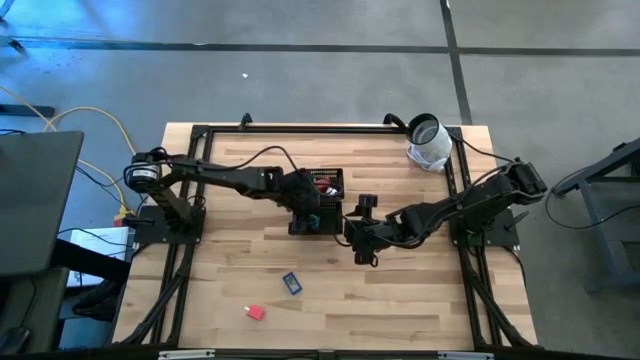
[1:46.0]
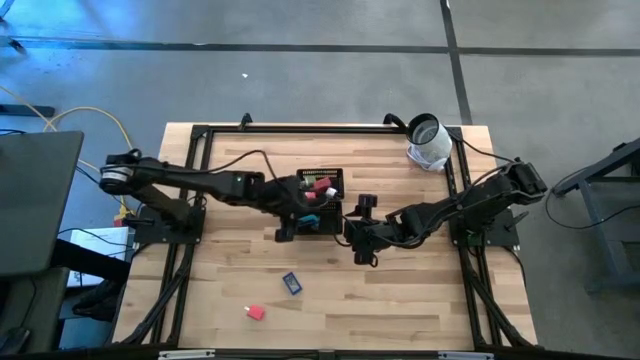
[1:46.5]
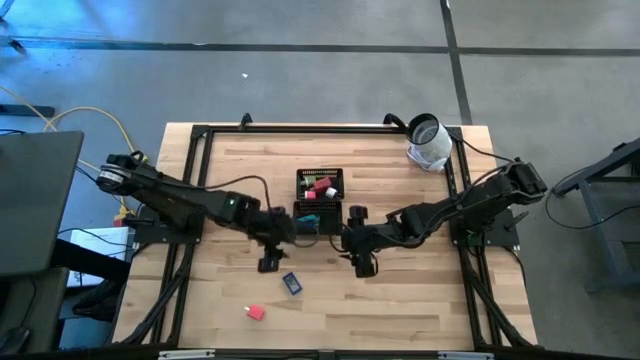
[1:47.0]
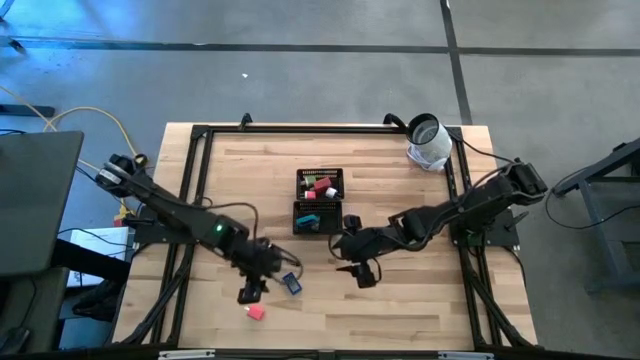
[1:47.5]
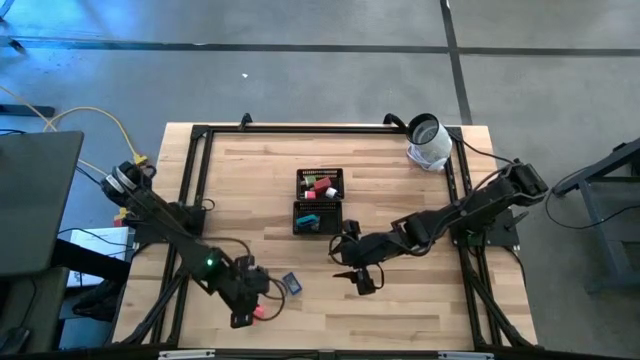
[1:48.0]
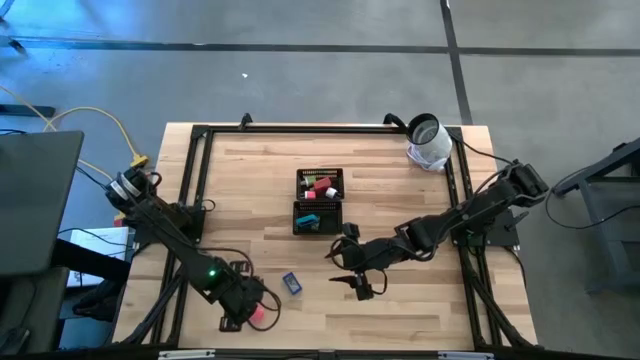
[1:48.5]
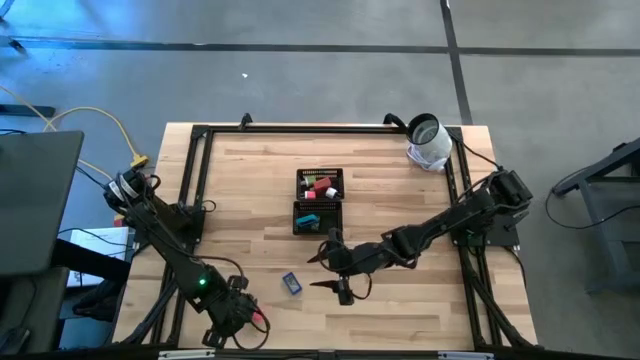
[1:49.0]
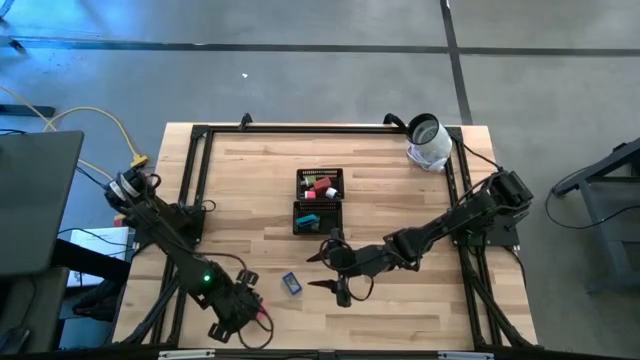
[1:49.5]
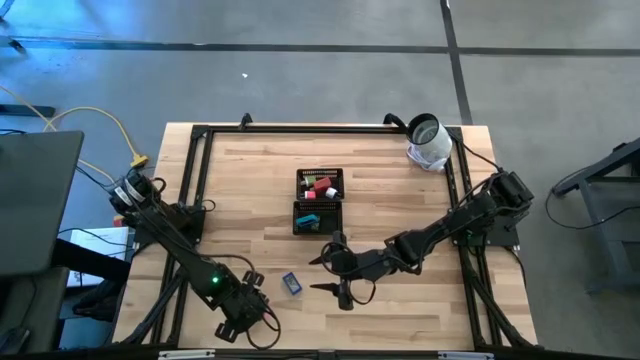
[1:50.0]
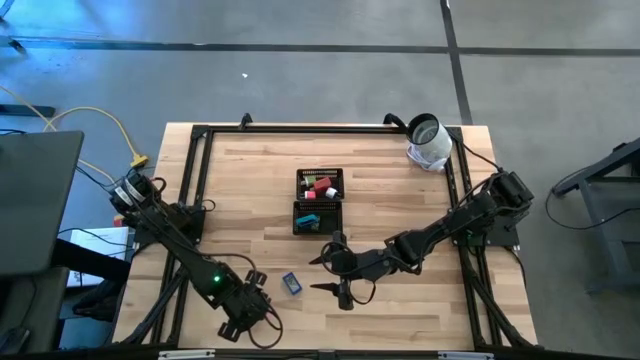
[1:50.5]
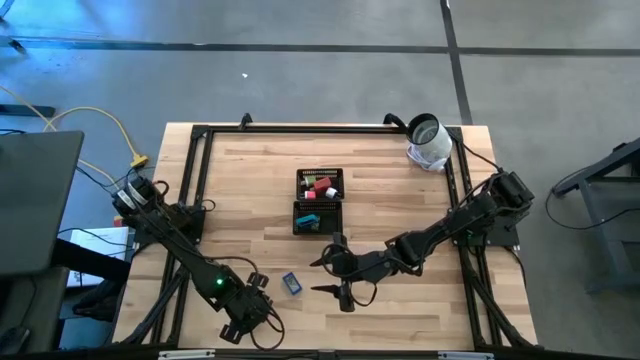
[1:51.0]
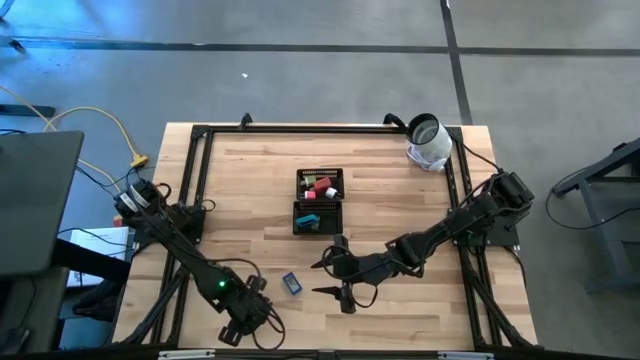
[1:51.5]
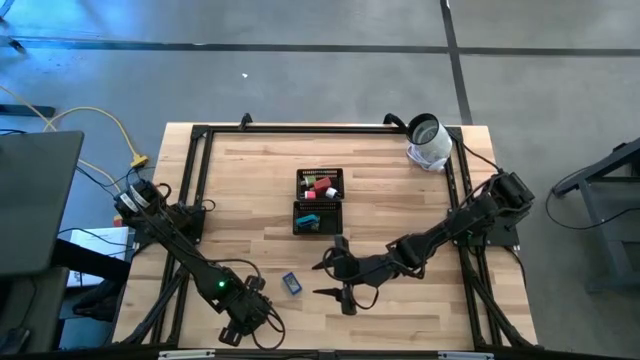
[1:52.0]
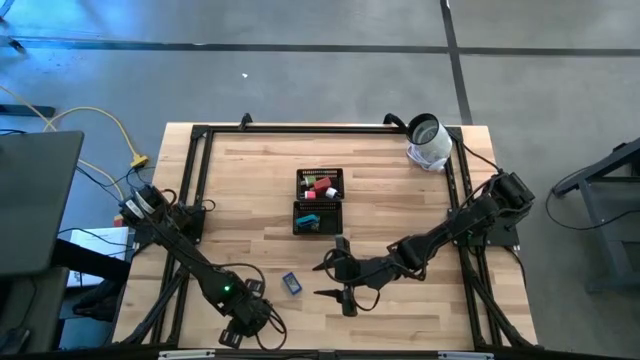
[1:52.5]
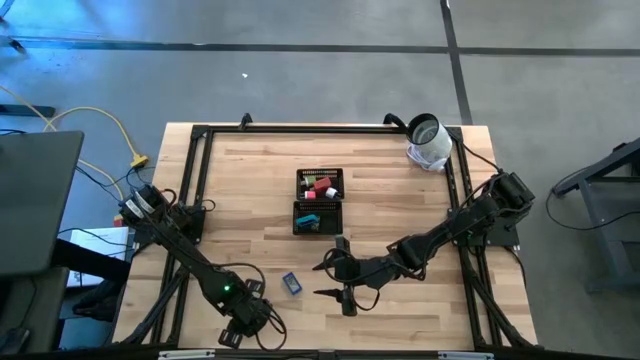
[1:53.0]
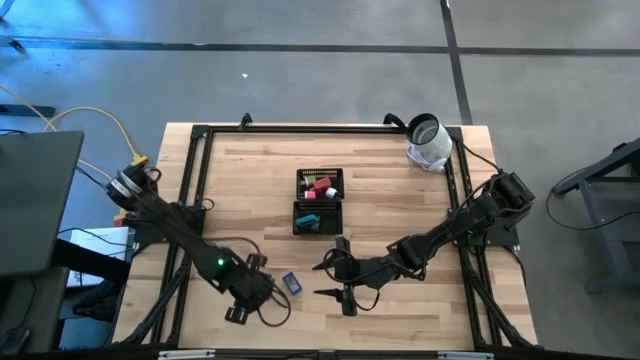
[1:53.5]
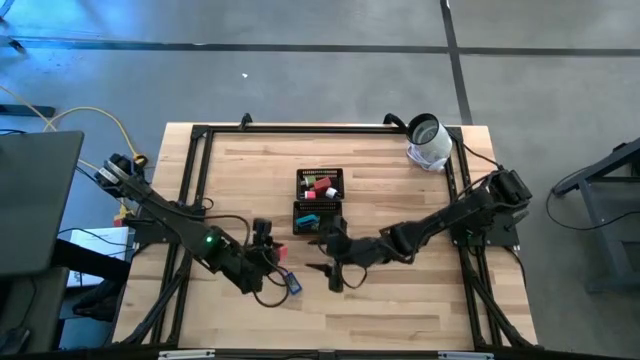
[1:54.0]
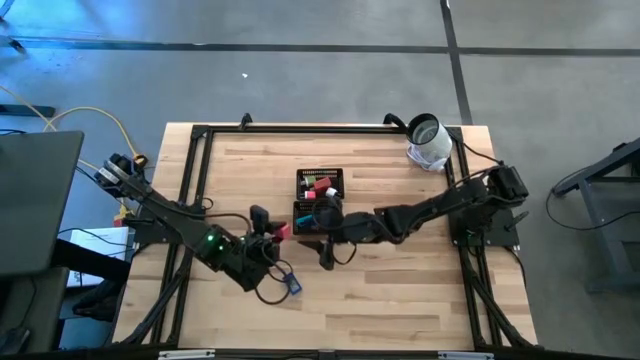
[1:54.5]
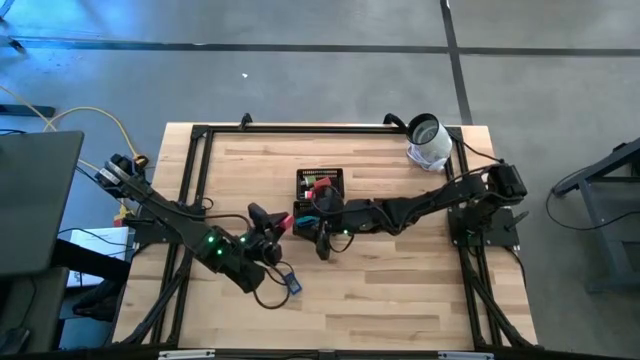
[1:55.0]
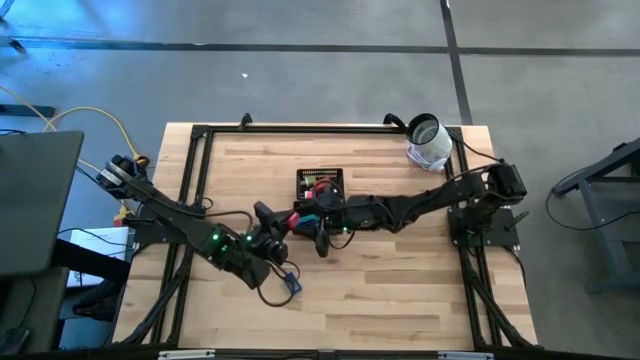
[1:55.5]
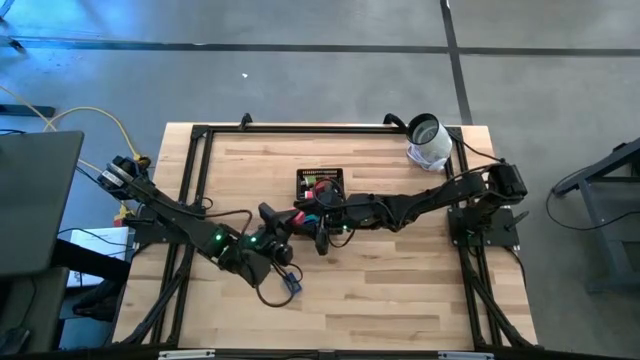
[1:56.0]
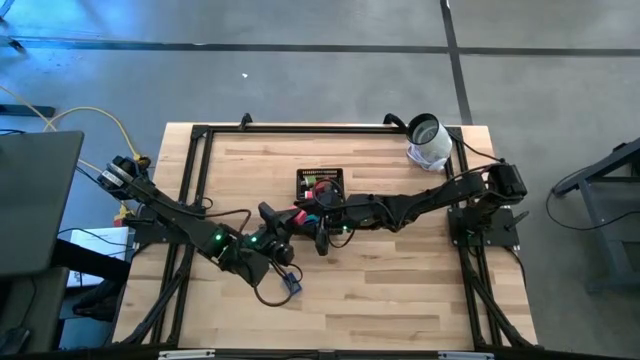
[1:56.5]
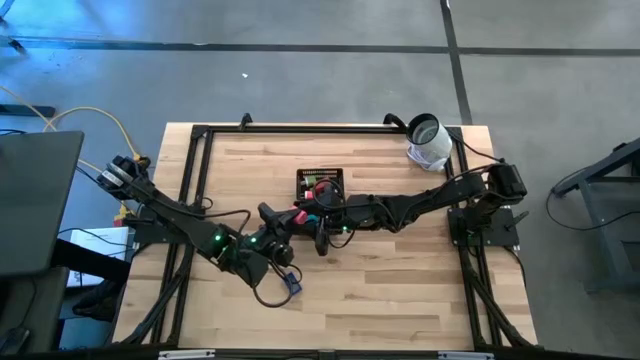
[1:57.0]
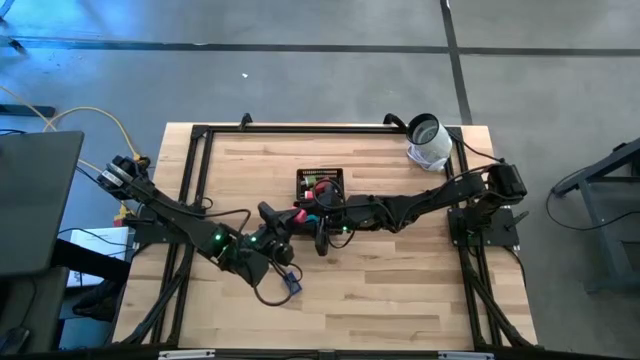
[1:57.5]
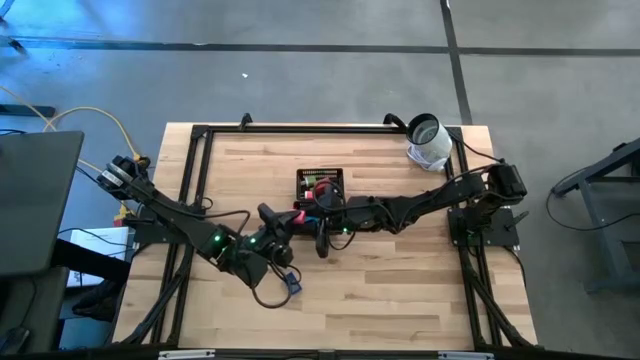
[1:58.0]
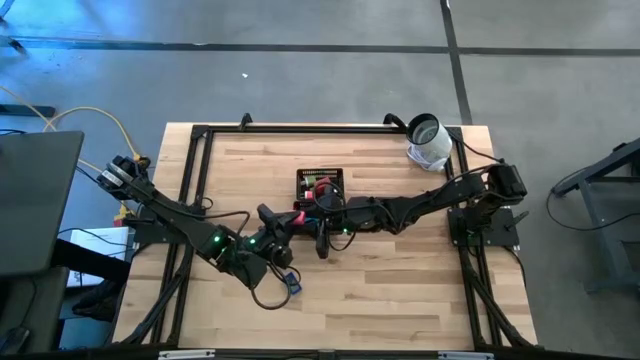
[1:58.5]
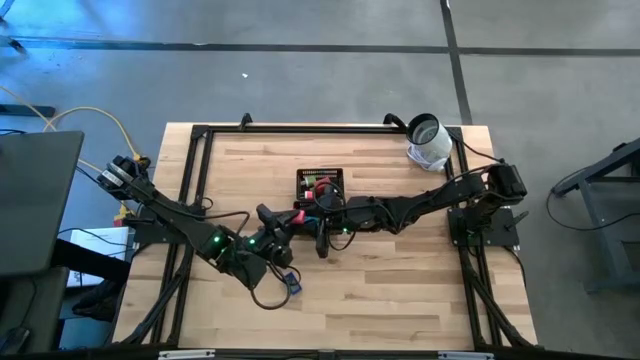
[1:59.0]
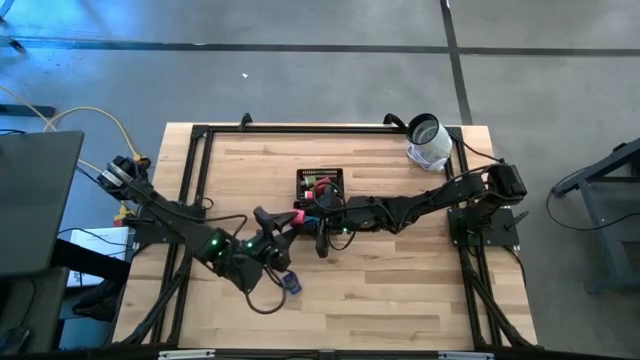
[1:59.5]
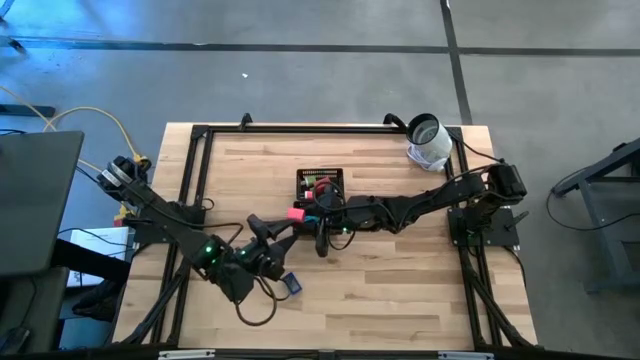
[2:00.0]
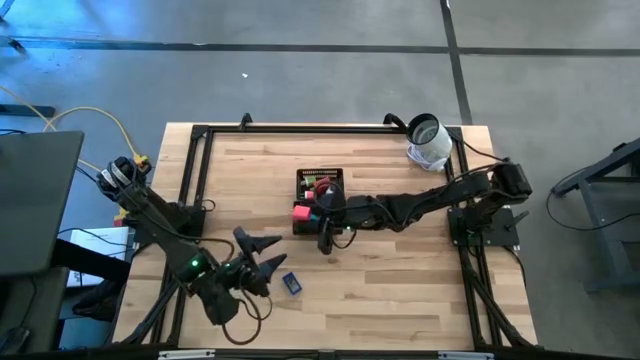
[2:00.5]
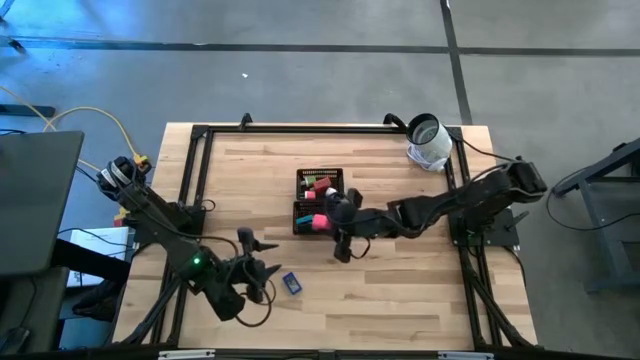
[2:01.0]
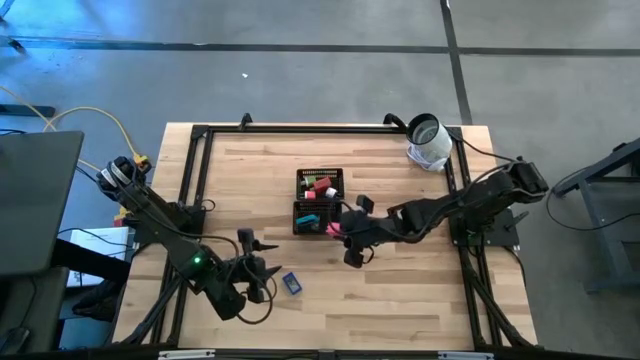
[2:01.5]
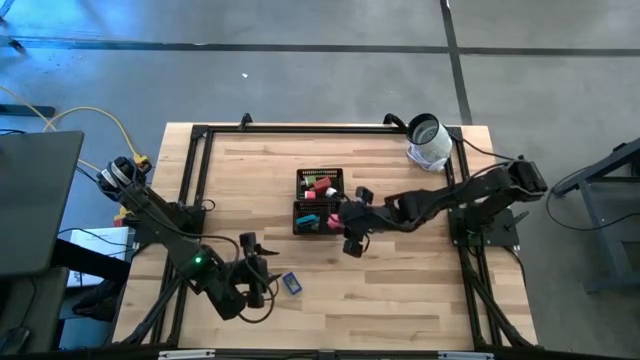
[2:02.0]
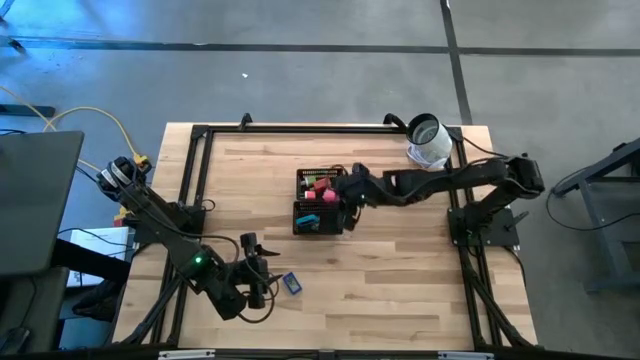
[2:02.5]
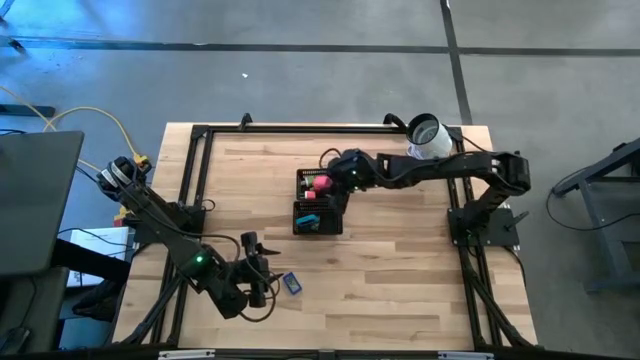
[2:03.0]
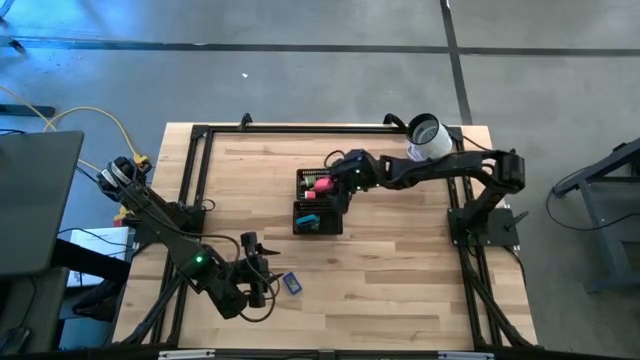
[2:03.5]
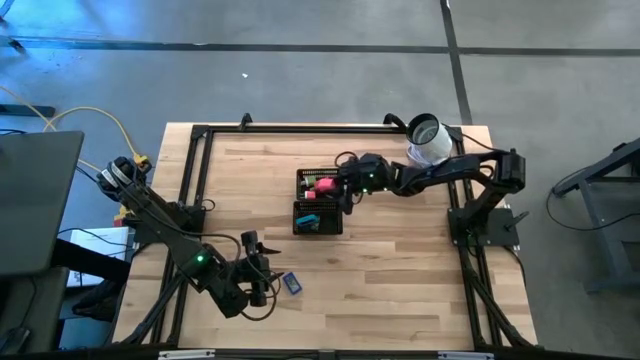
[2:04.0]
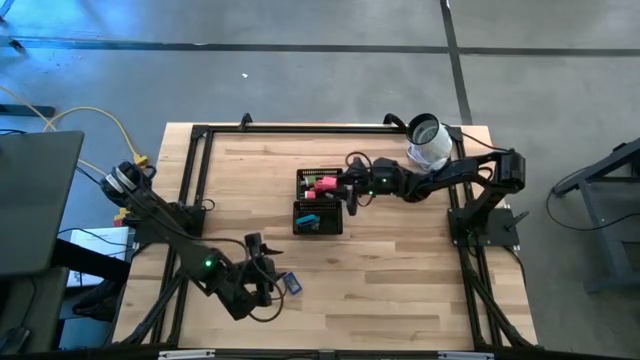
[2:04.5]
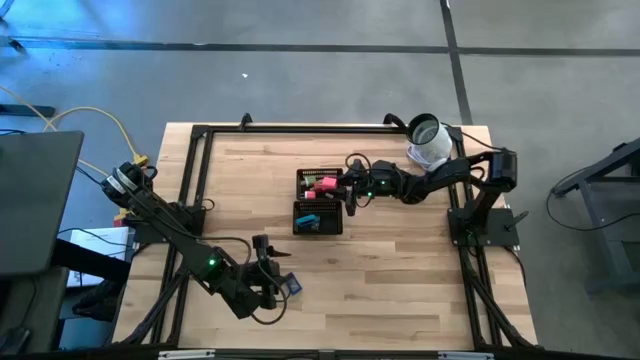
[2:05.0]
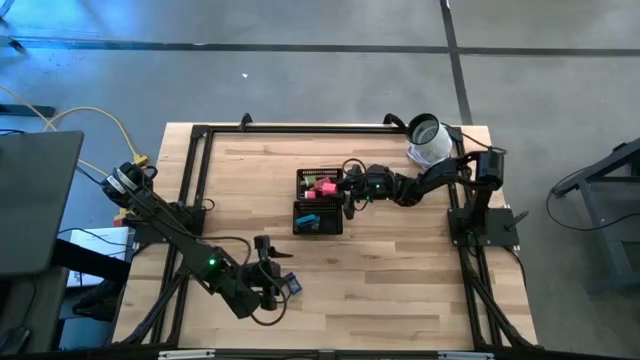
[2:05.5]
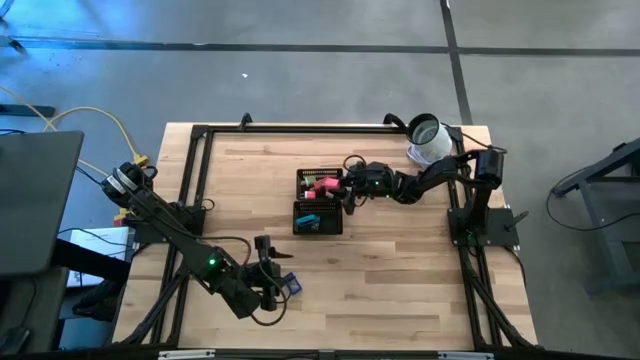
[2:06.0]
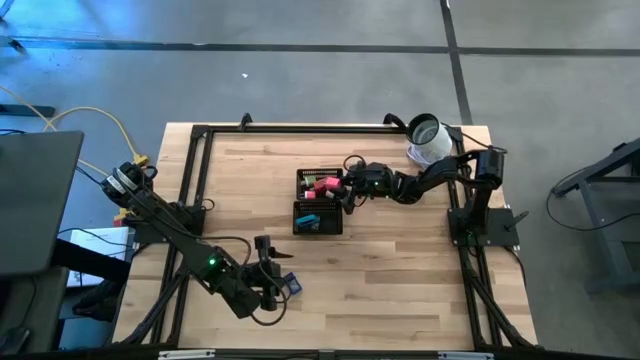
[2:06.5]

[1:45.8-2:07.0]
Task: Pick & Place Office items
Put the pink charger adapter into the top black bin
